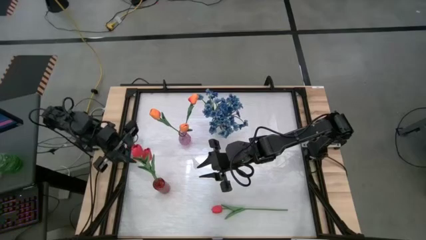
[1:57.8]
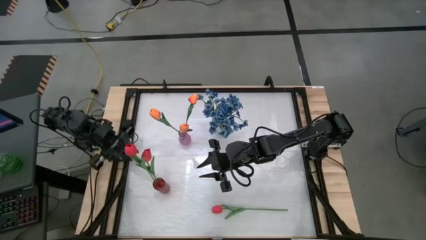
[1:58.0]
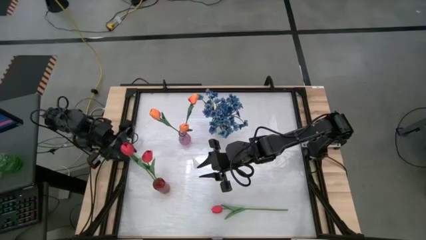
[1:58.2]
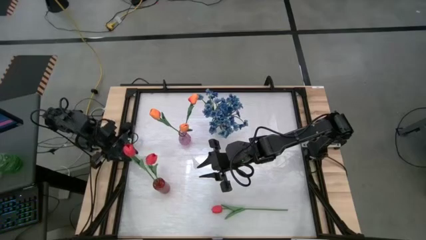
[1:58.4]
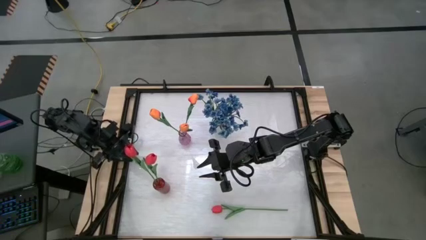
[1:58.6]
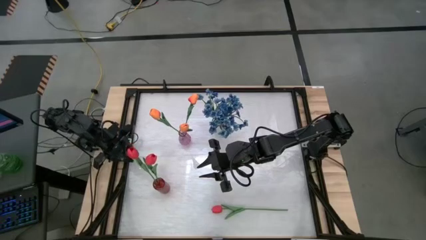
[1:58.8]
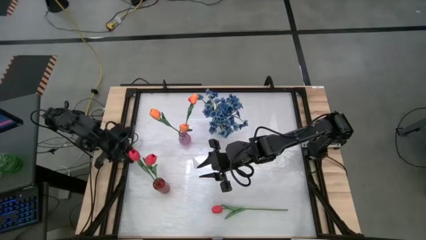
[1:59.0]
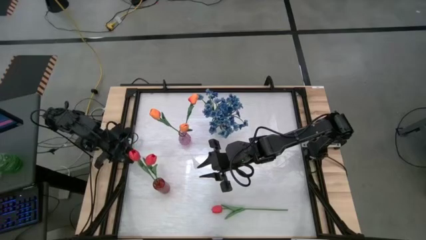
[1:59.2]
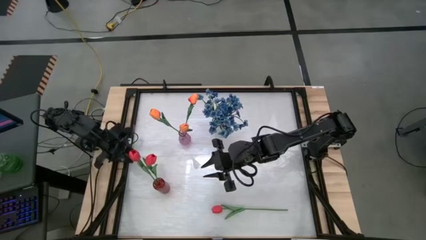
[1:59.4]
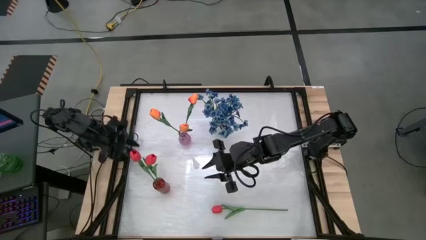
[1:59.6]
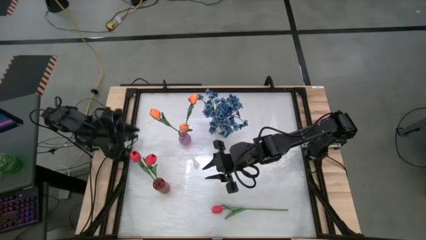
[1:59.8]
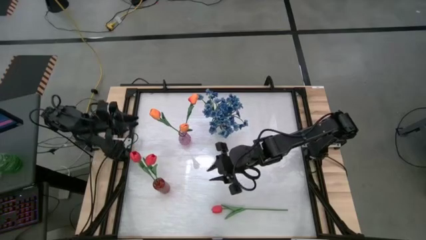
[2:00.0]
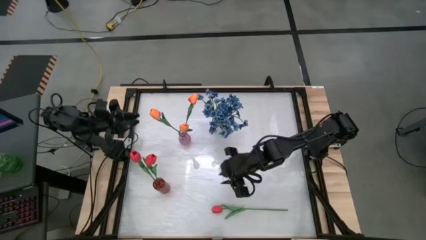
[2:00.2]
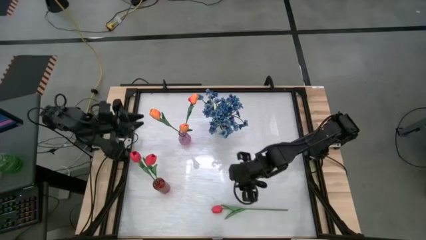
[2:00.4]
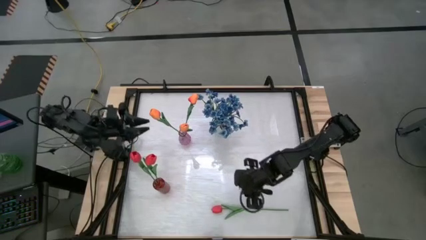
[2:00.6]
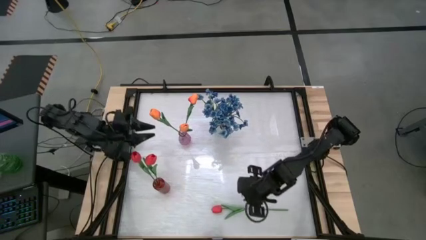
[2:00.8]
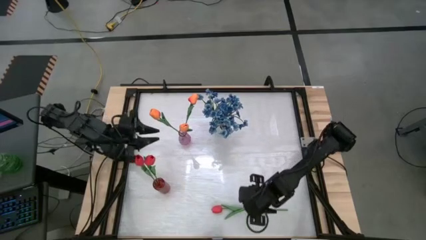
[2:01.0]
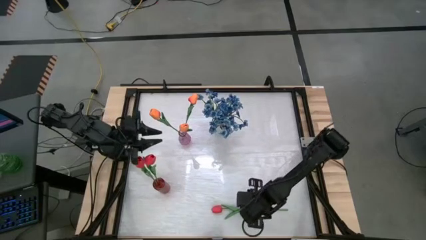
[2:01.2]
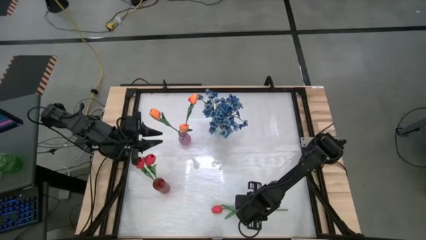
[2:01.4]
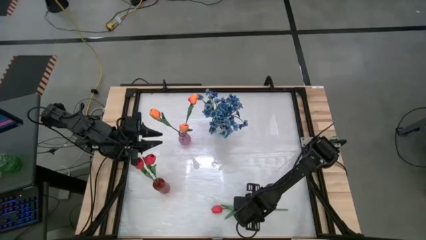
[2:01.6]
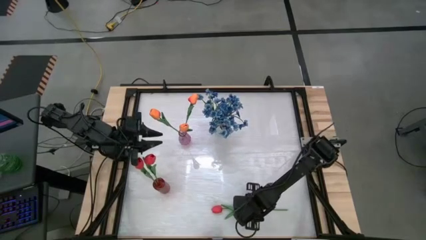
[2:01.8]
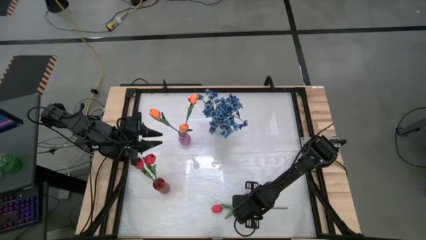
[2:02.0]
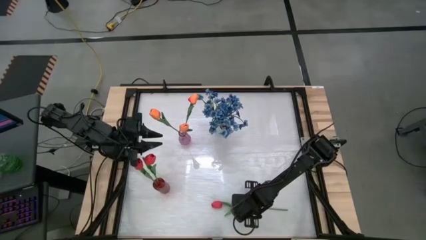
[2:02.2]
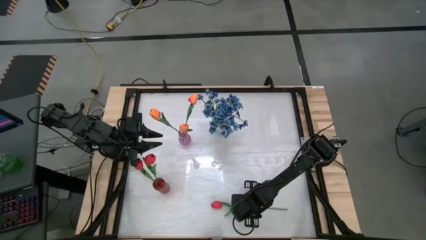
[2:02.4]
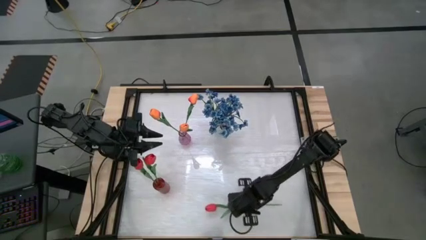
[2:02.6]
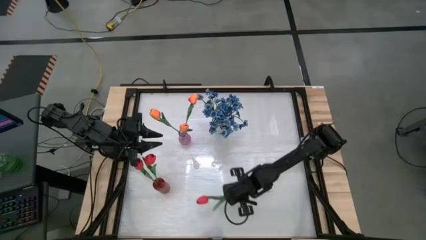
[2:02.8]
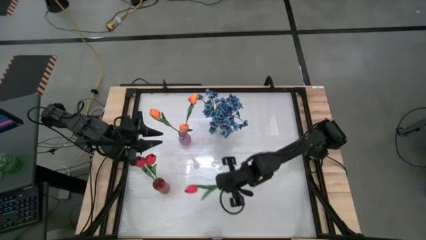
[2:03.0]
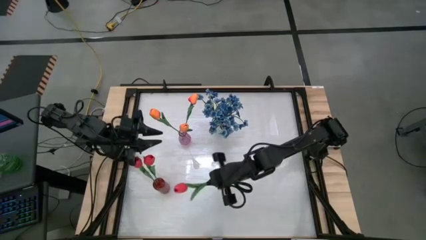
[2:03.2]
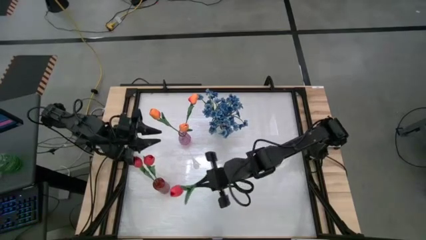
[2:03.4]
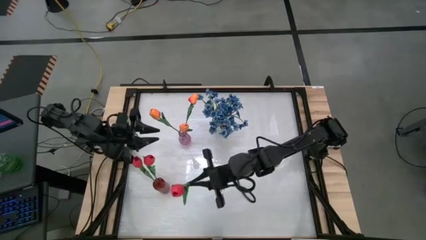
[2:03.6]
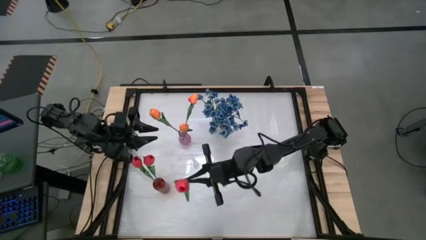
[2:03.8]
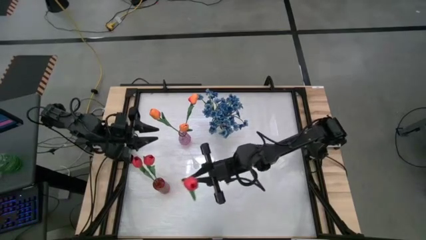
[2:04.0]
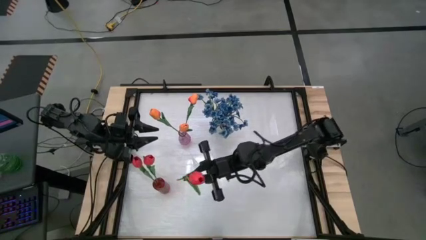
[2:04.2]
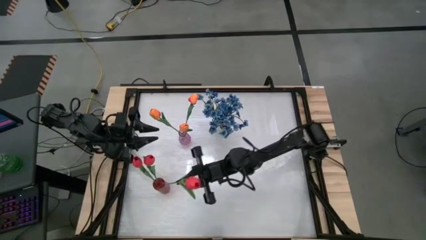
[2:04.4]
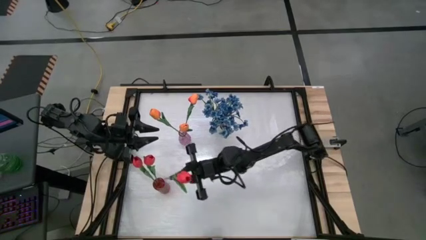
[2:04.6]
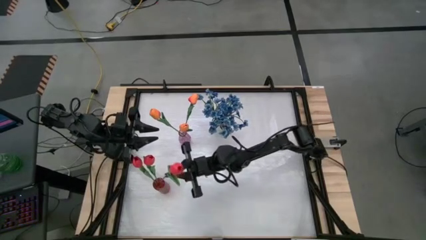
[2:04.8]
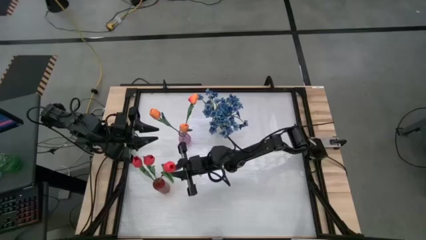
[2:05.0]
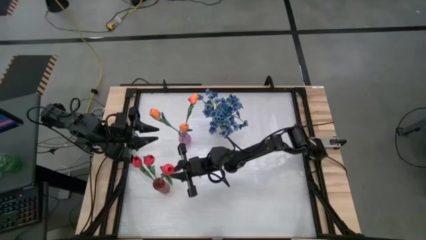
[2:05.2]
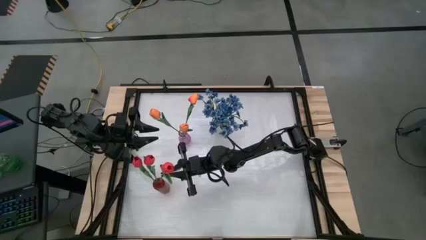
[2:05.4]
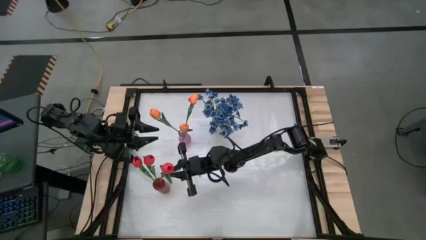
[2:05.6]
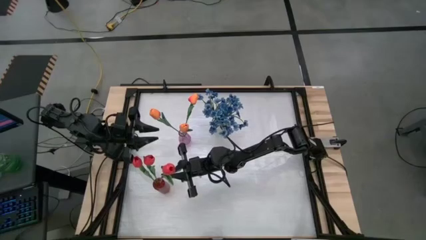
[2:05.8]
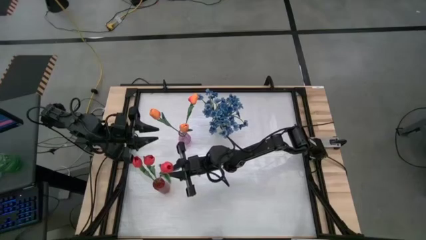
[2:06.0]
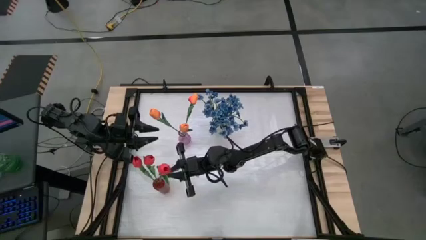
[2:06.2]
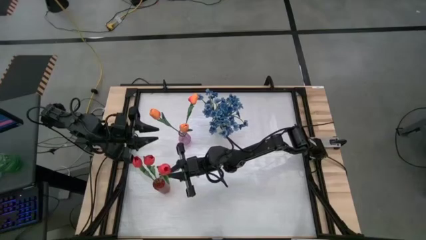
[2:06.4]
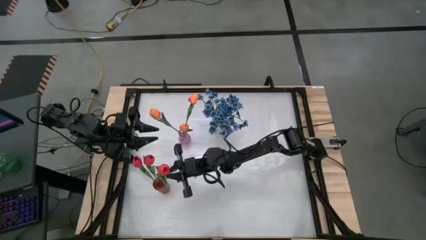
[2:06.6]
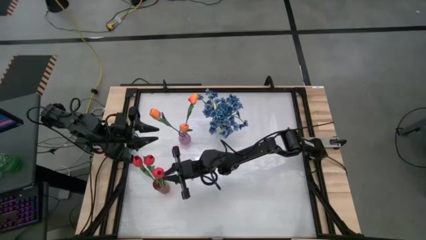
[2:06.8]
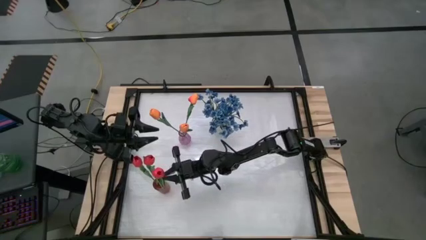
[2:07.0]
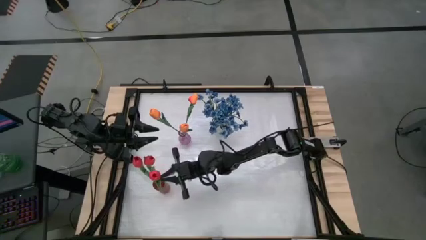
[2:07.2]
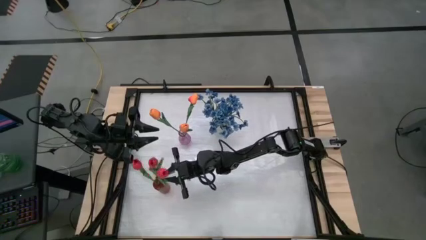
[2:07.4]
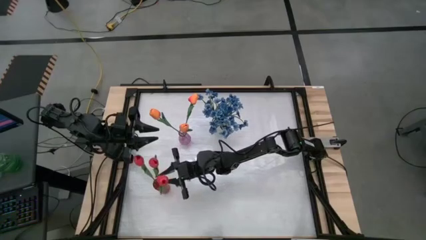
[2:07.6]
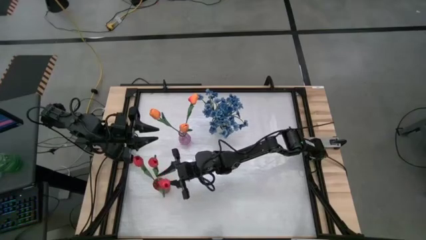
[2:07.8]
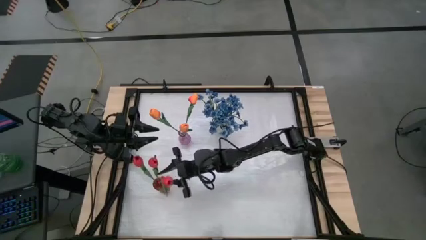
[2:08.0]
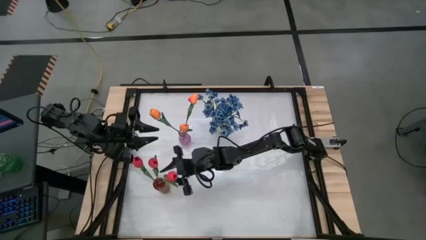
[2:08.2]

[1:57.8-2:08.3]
Task: Sort flowers into vase by color
Put the red tulip into the red vase

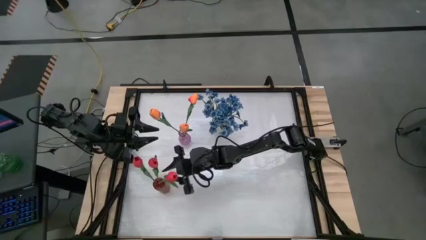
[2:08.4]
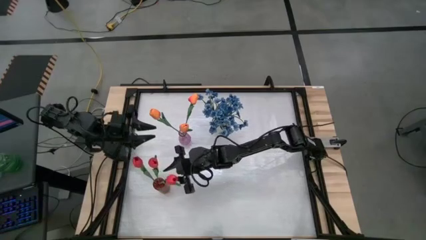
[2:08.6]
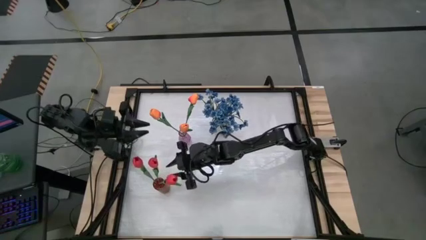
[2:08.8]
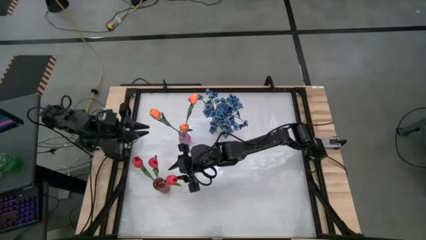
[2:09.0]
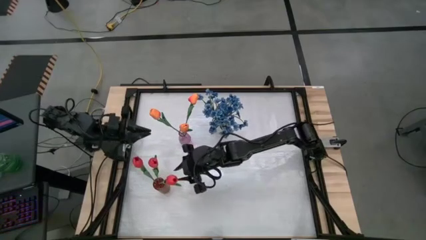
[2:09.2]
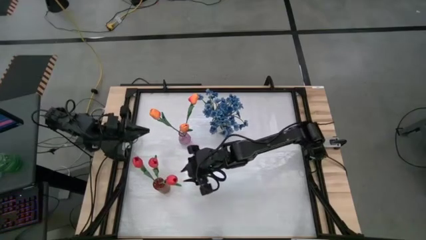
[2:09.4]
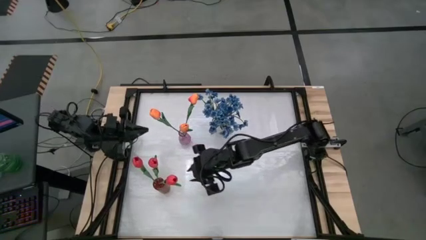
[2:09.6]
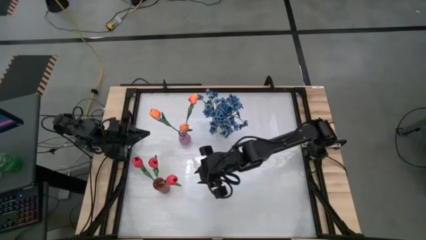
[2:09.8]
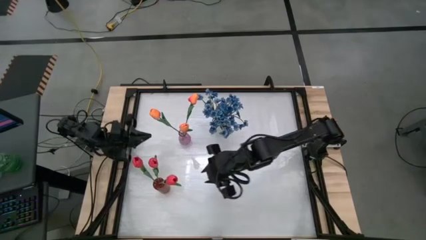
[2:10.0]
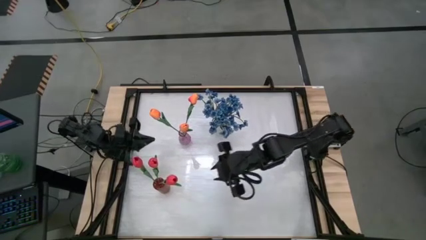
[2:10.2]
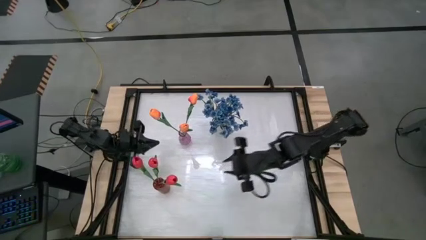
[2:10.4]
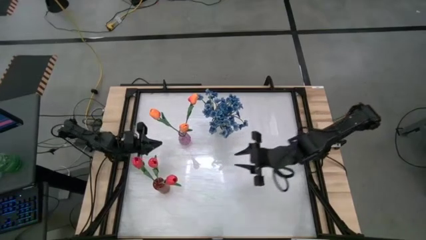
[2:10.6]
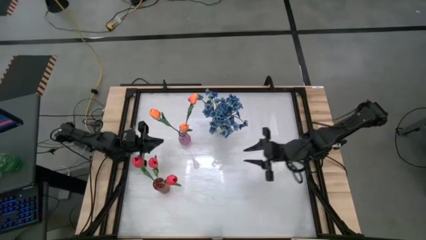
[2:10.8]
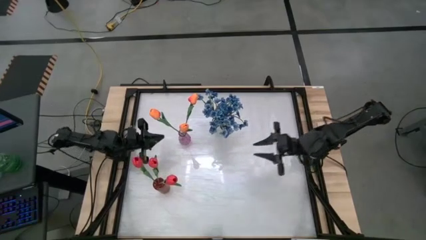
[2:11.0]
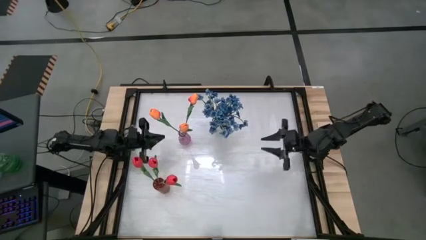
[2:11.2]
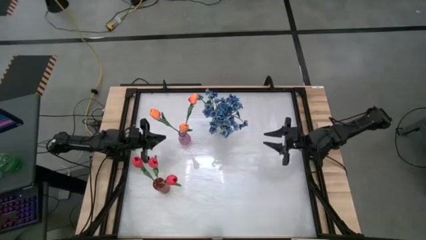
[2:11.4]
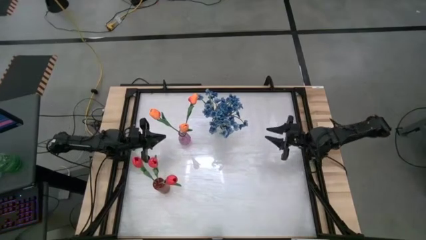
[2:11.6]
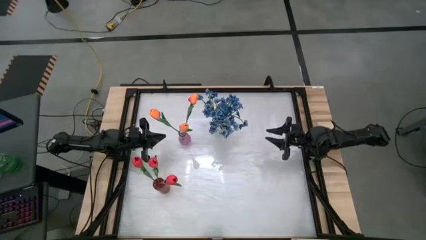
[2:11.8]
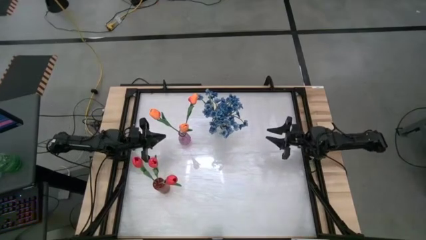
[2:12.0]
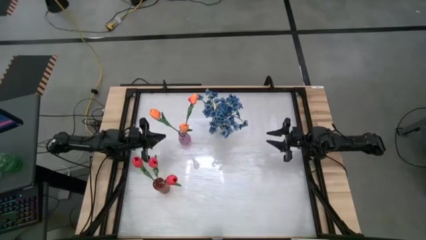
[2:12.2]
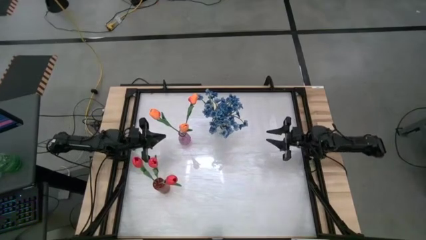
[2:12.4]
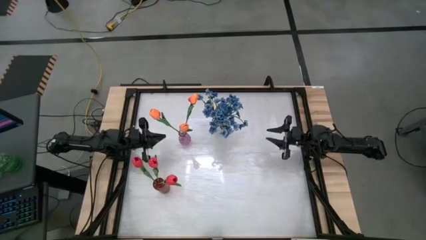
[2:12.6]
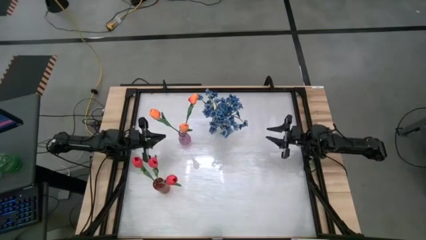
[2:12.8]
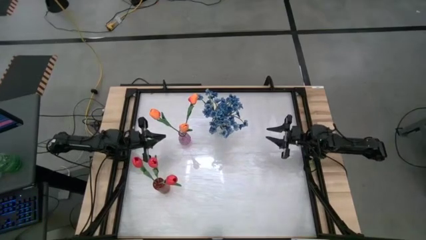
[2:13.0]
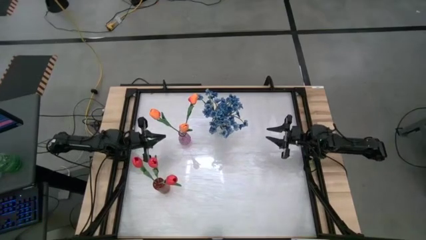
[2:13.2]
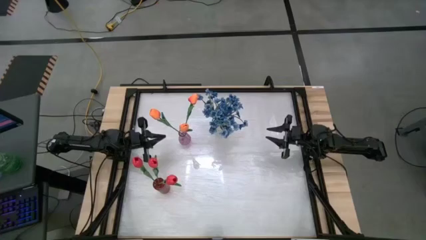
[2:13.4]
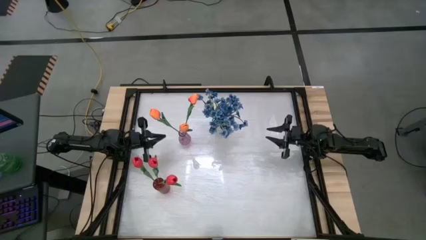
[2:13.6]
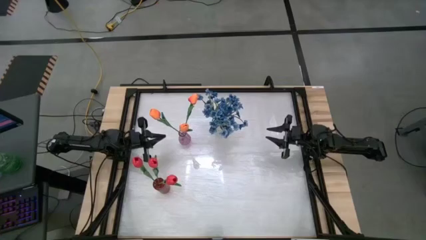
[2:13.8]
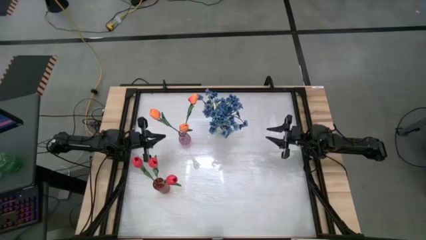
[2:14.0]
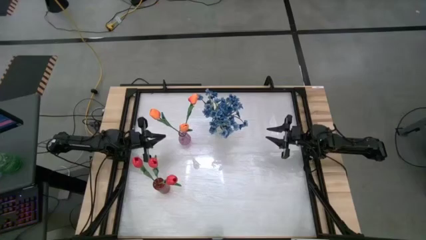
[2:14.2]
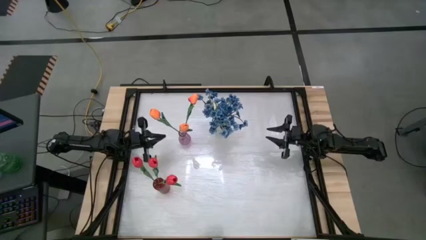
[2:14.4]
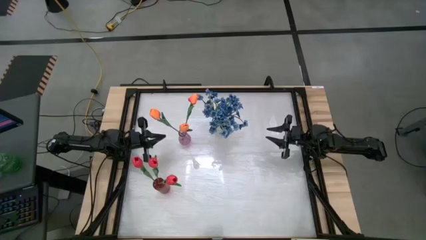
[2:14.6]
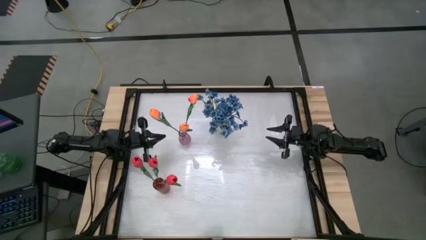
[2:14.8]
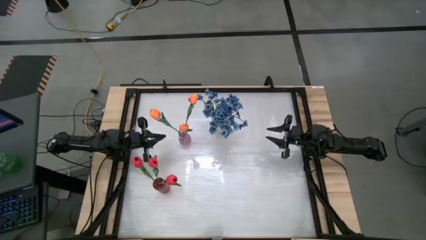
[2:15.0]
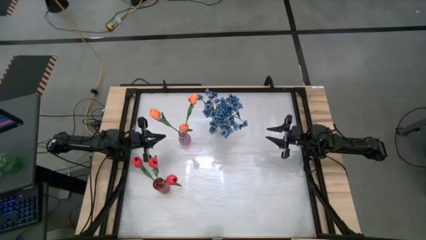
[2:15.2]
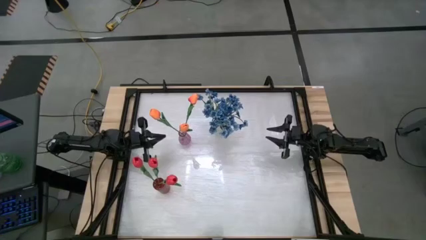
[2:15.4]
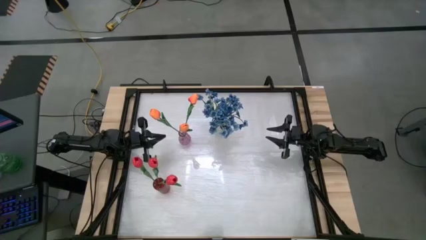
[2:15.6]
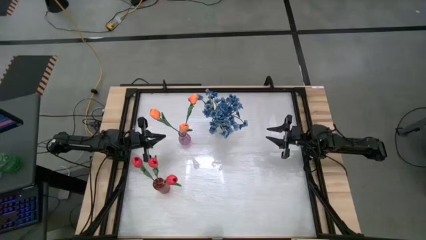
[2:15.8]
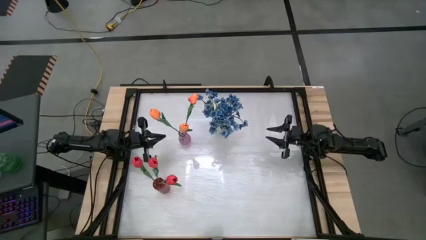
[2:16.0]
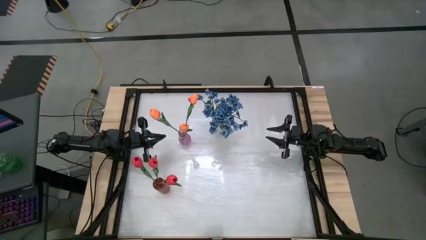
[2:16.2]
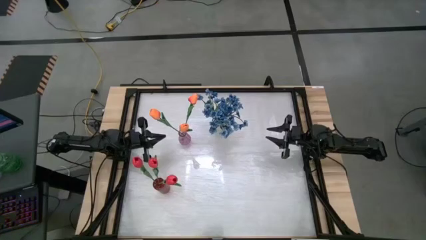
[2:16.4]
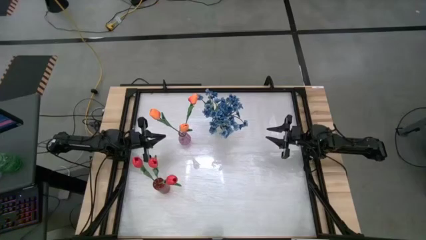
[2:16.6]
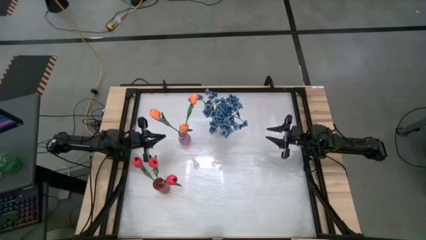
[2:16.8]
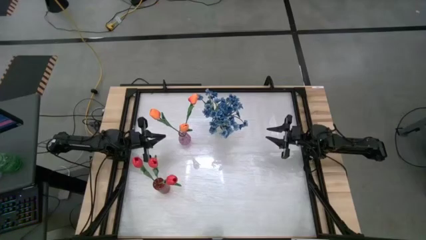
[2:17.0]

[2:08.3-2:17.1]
Return to Home Position
